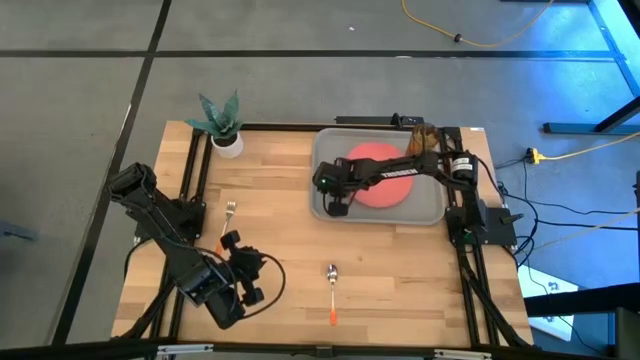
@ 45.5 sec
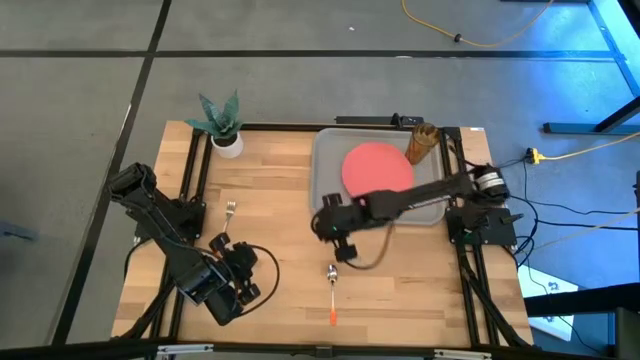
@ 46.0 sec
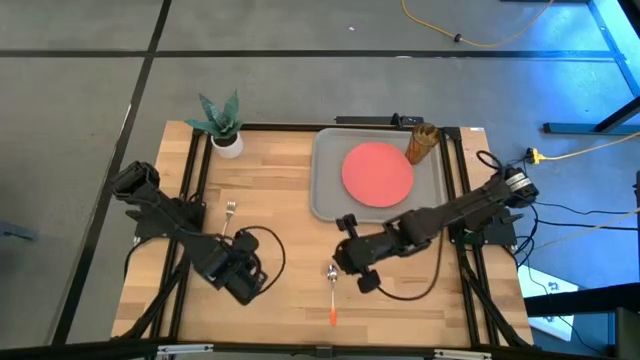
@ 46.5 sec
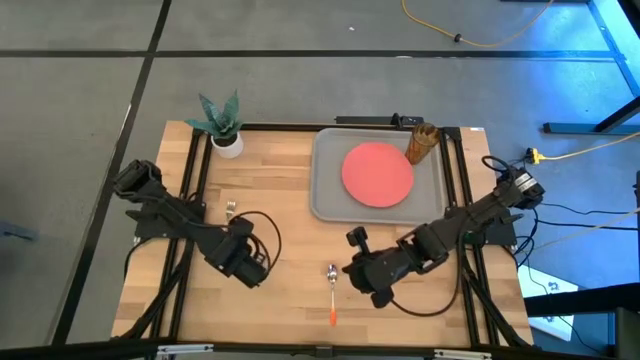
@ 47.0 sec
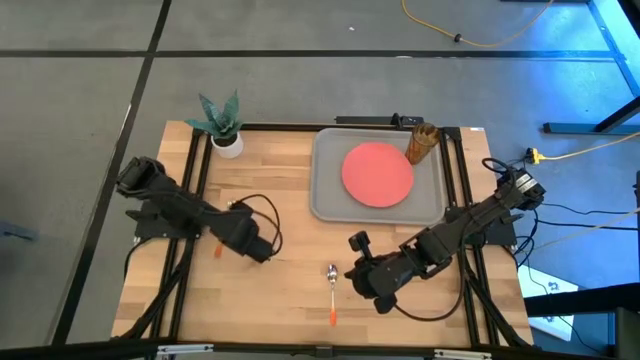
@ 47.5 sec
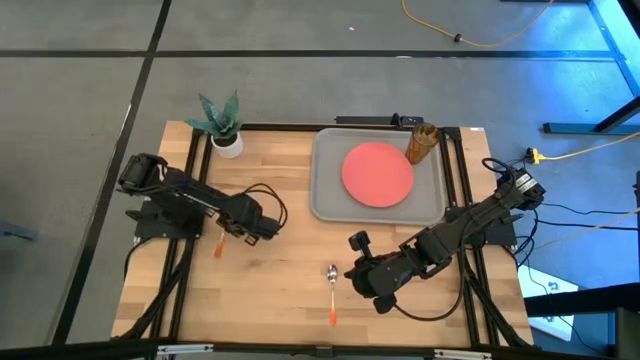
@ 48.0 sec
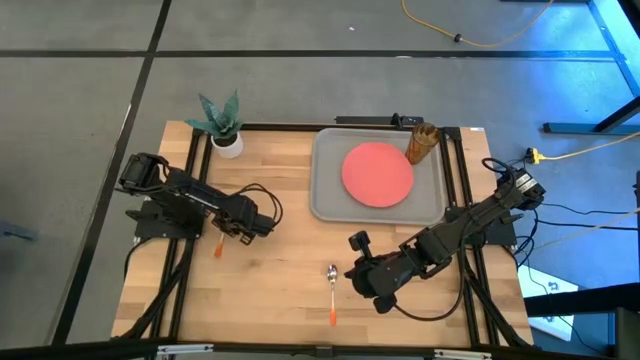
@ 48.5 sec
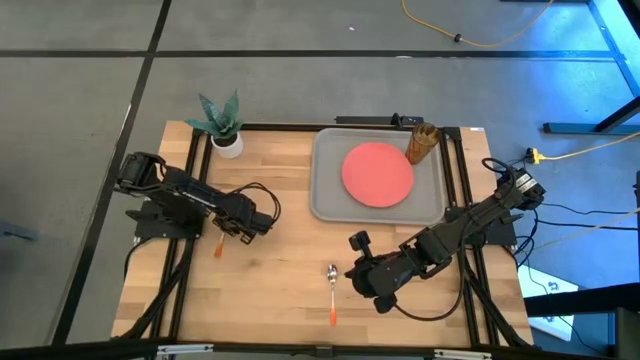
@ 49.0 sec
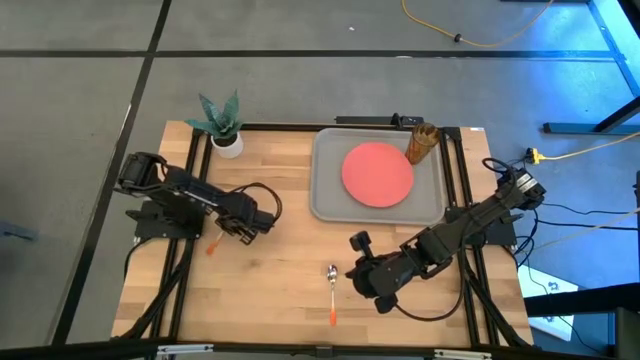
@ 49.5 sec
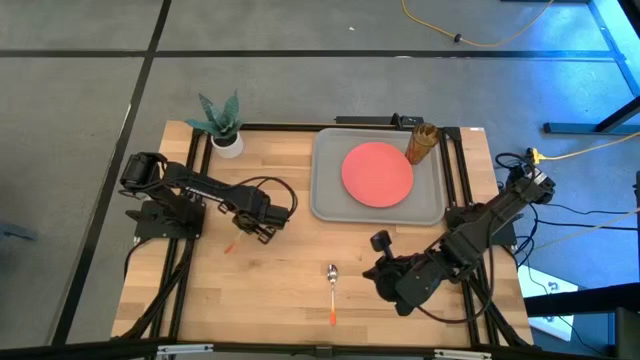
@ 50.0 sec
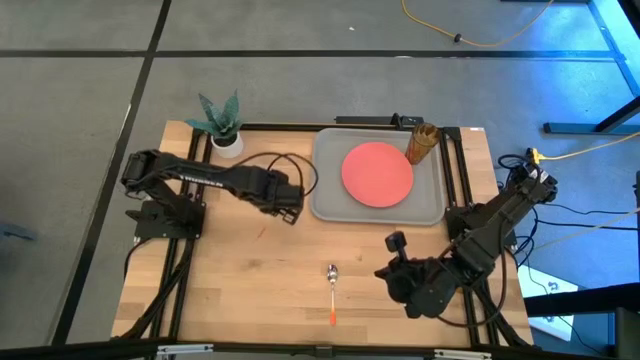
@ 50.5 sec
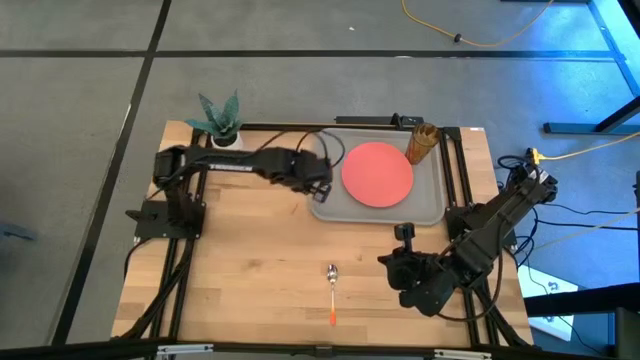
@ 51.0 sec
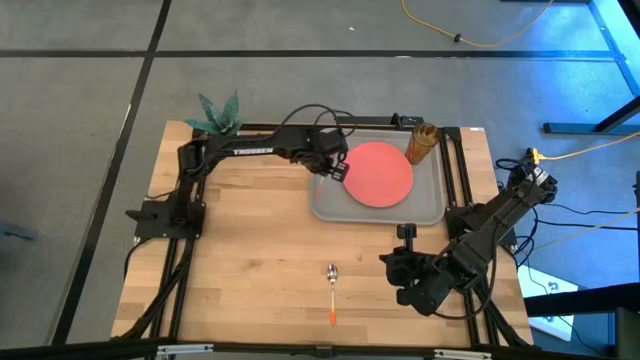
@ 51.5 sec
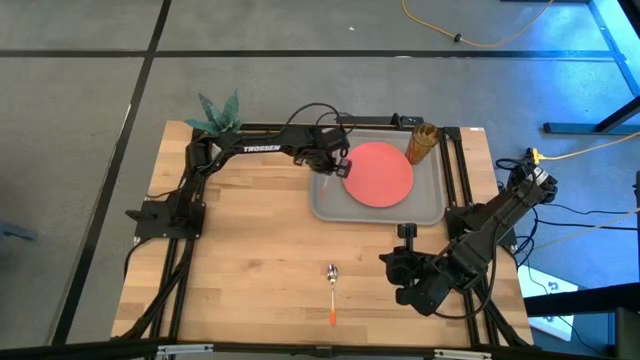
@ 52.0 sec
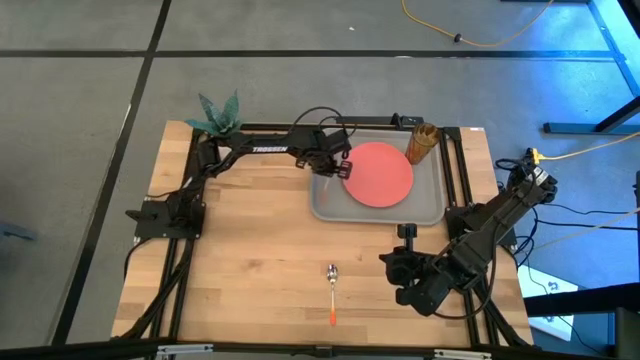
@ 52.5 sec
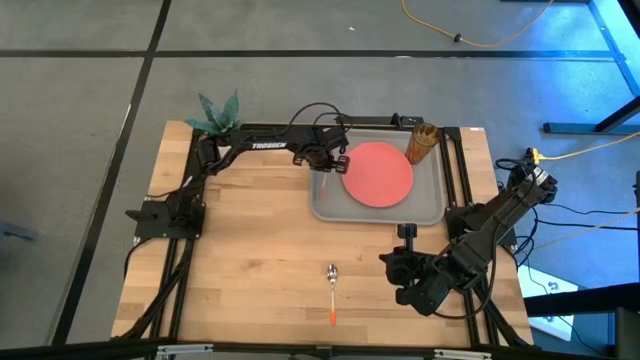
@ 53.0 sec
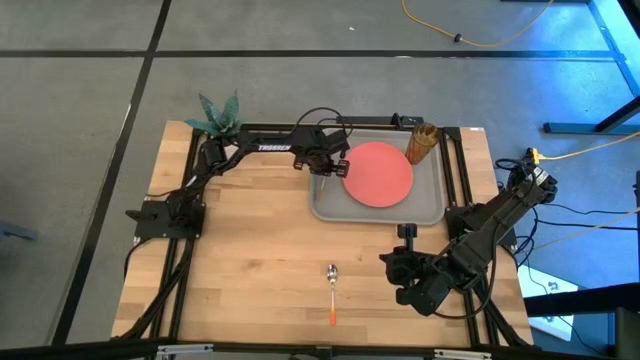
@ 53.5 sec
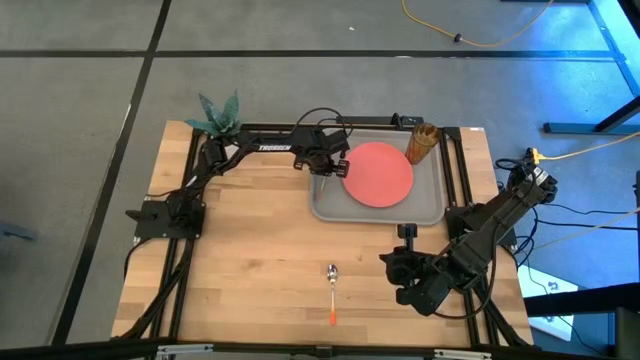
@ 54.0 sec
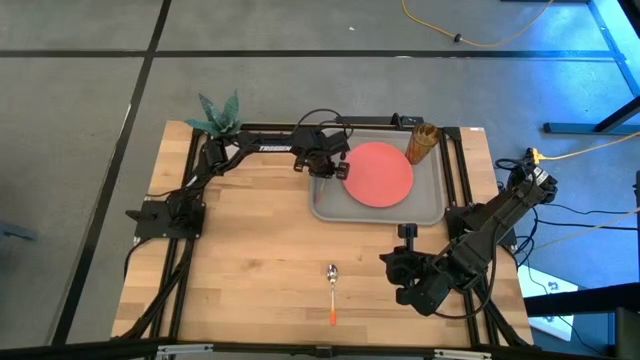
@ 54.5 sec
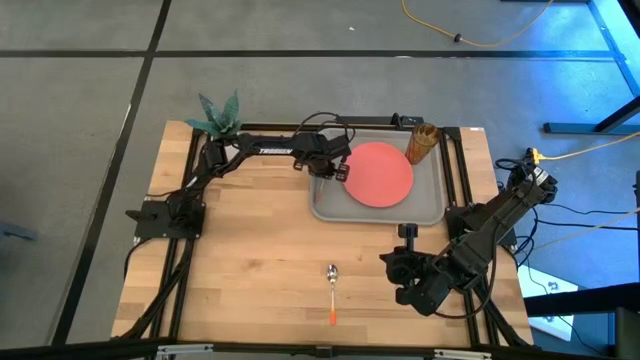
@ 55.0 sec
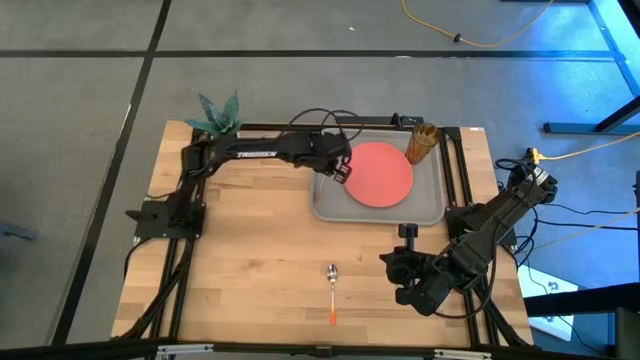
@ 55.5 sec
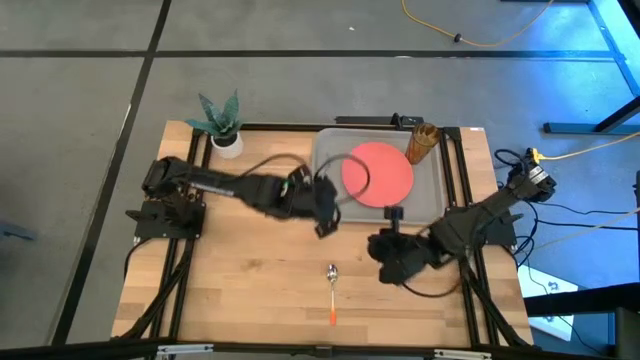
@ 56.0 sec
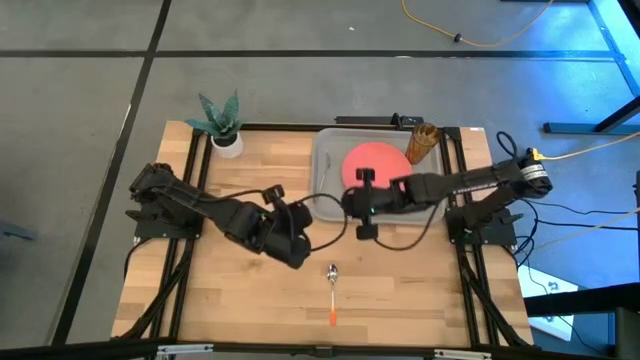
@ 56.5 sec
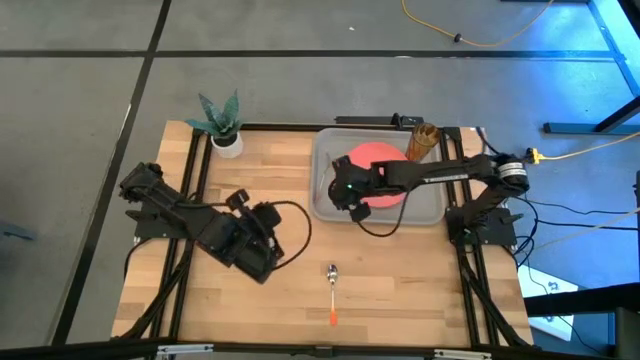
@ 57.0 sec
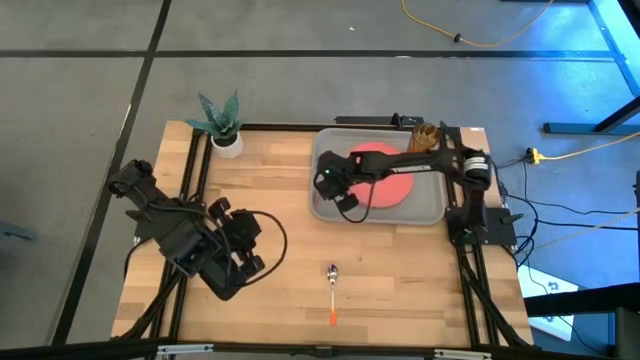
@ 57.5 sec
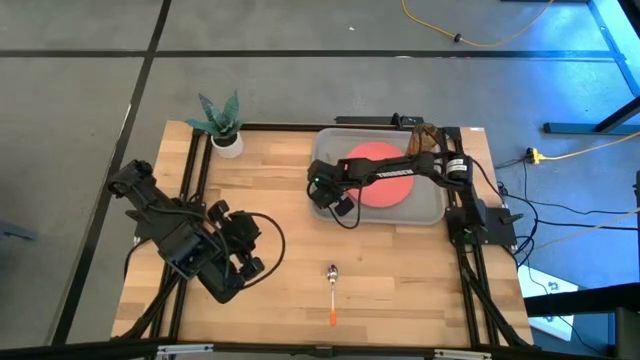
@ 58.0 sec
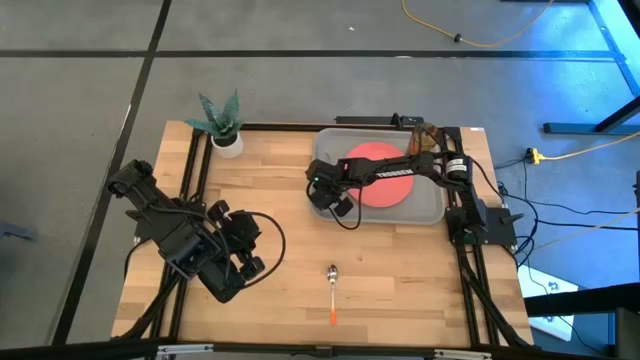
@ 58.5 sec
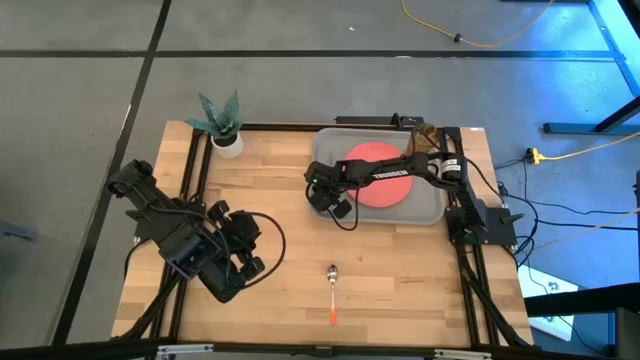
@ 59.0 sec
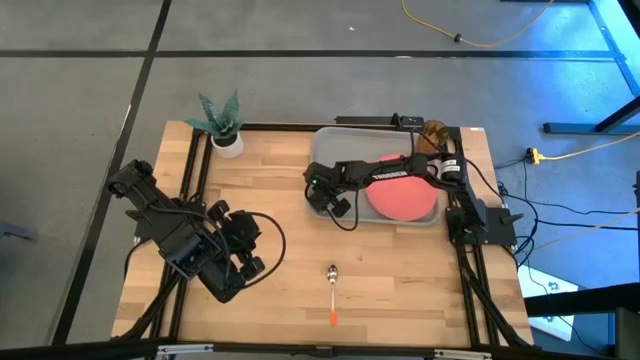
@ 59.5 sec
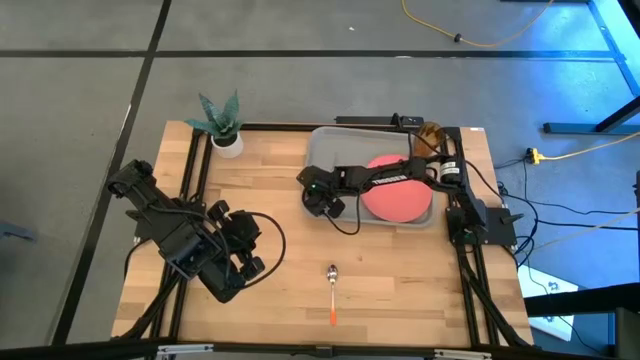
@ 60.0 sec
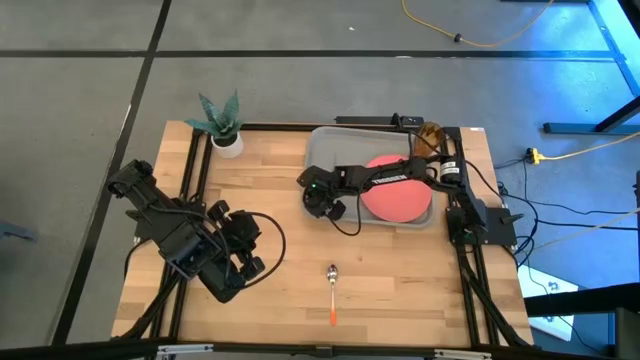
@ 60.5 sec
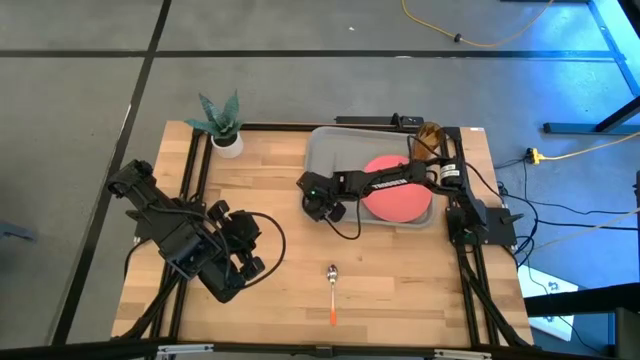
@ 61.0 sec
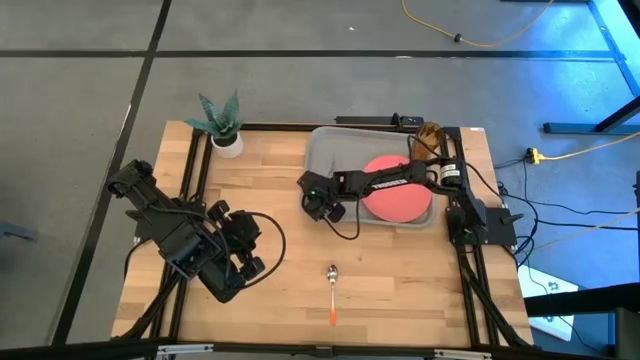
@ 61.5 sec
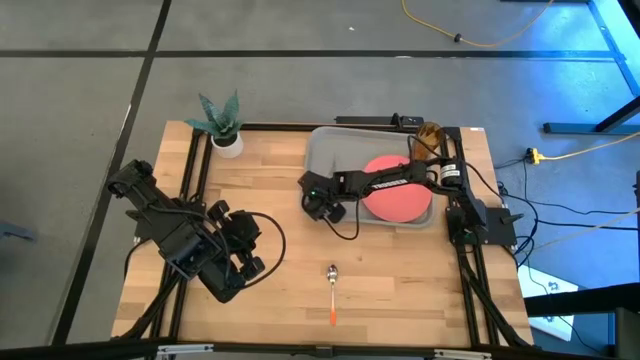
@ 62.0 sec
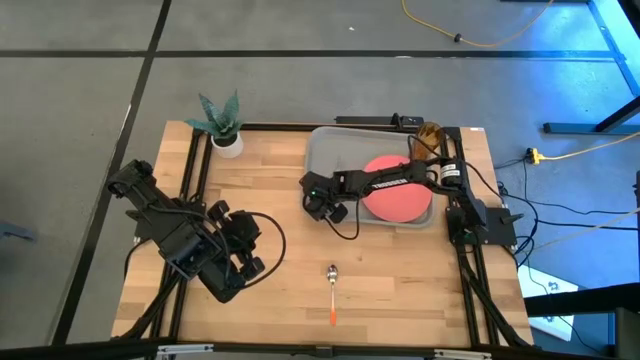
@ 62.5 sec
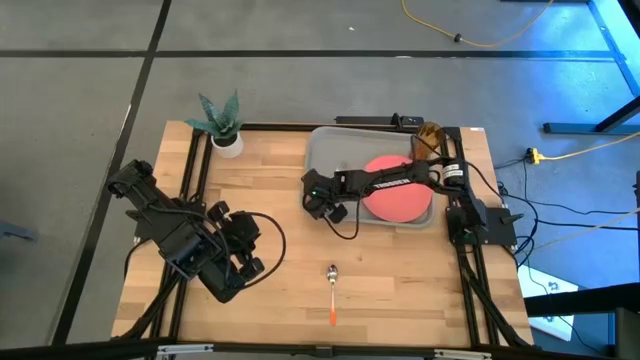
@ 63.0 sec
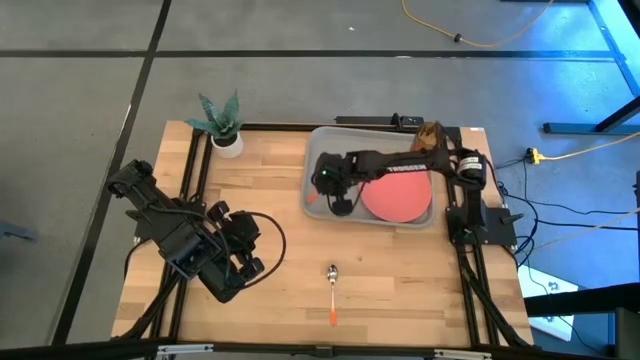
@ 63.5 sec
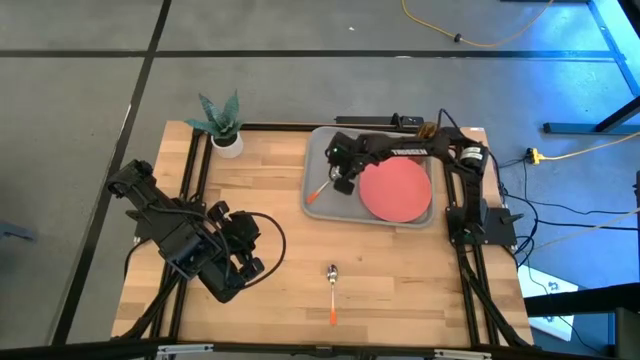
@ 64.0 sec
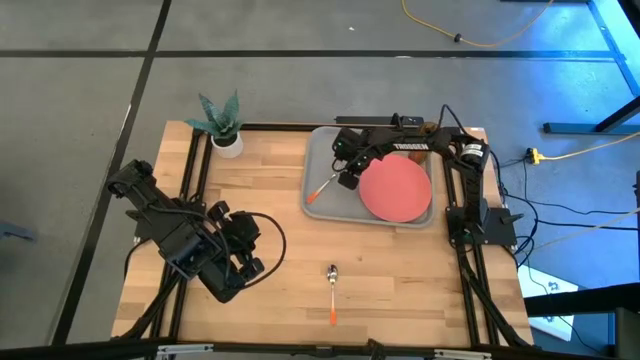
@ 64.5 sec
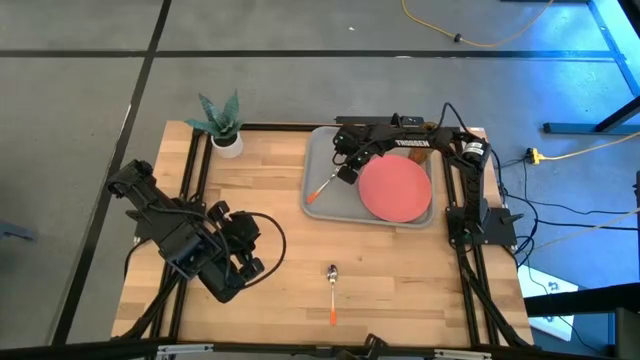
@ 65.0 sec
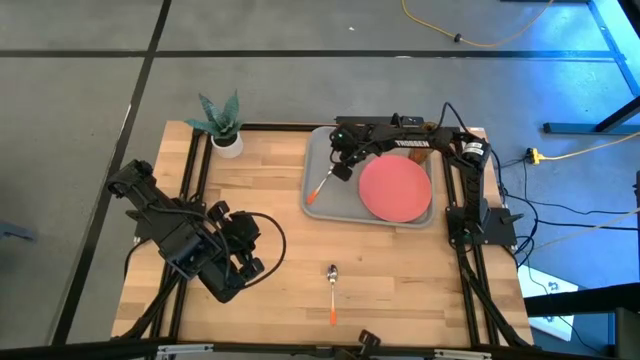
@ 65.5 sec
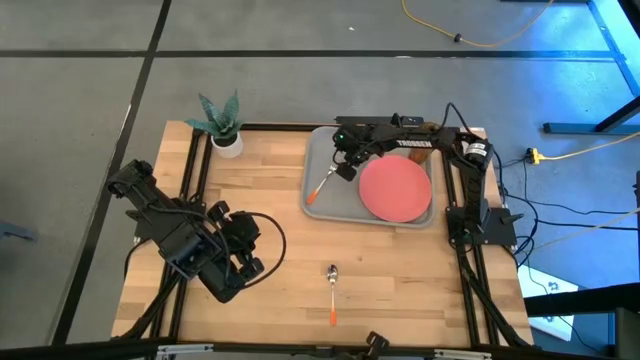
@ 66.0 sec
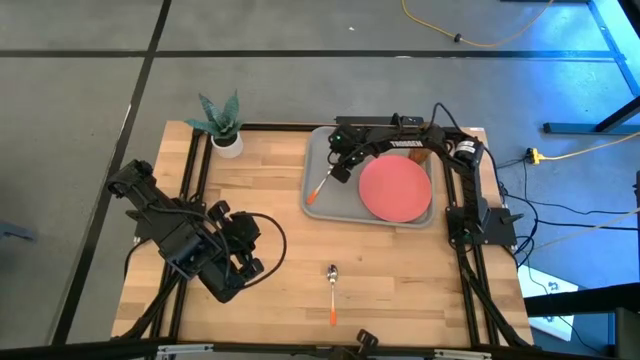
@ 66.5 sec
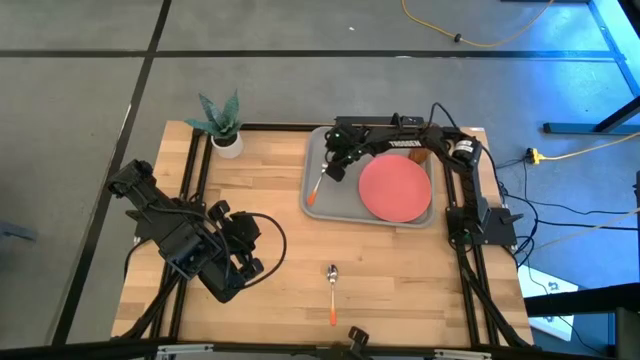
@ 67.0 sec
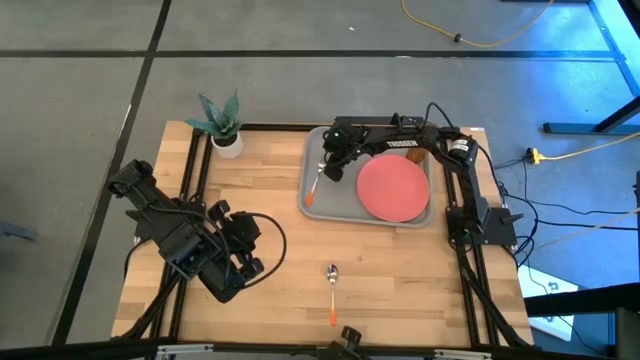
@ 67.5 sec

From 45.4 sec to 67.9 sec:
Task: Pick and place plate/cup/fork/spoon on tray
Put the orange fork on the gray serving tray to the left of the pink plate
